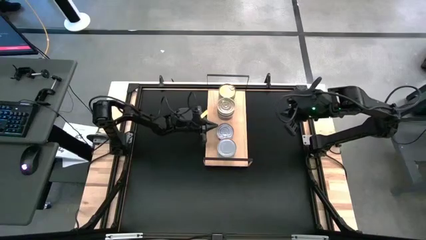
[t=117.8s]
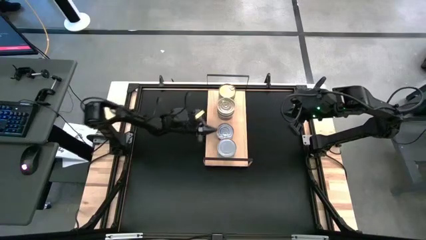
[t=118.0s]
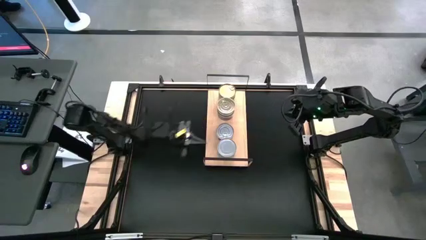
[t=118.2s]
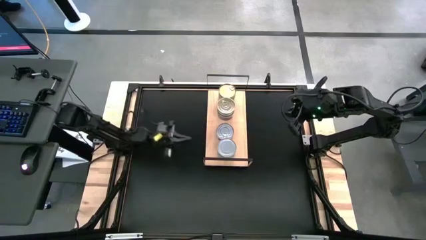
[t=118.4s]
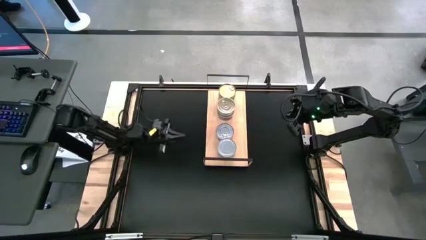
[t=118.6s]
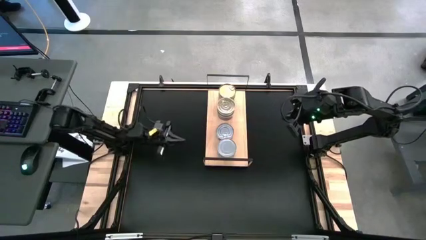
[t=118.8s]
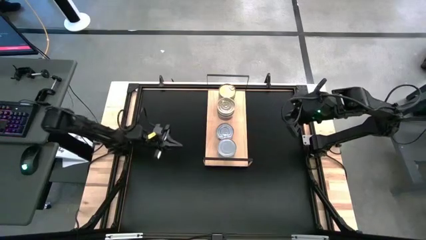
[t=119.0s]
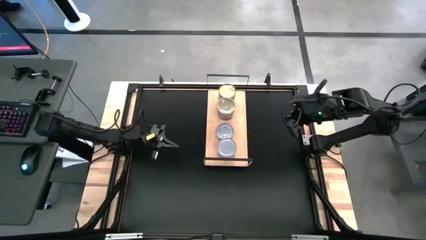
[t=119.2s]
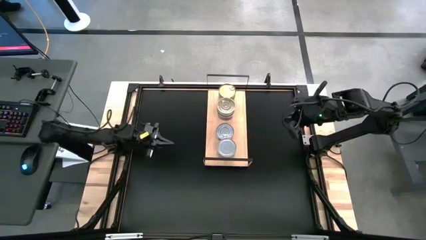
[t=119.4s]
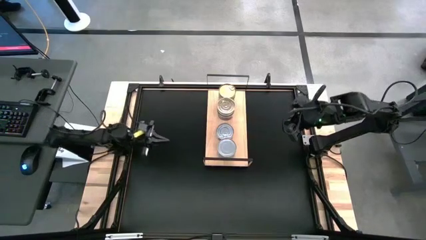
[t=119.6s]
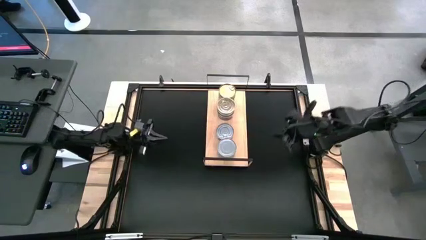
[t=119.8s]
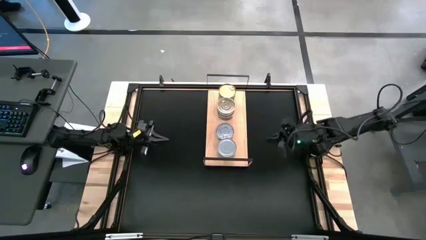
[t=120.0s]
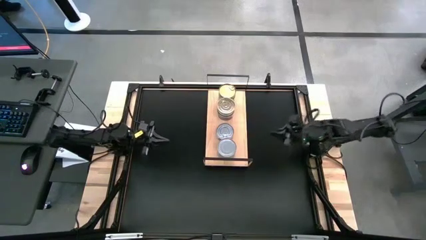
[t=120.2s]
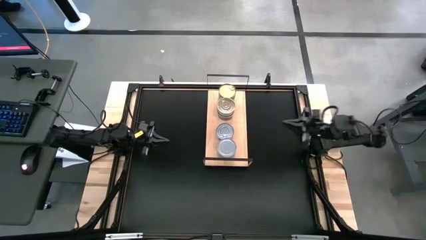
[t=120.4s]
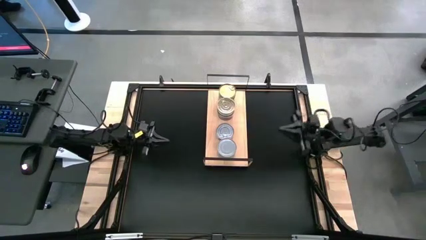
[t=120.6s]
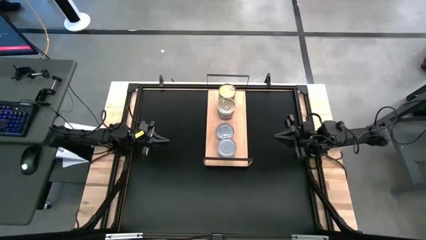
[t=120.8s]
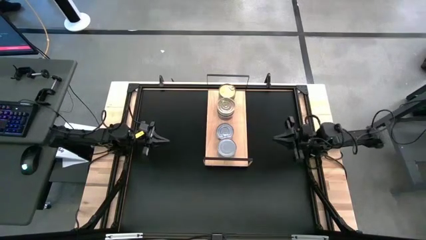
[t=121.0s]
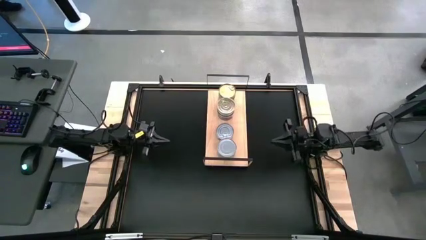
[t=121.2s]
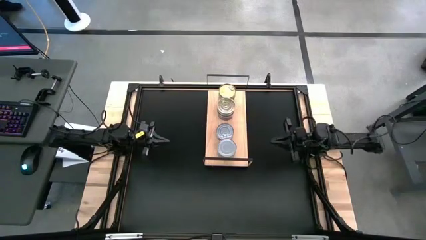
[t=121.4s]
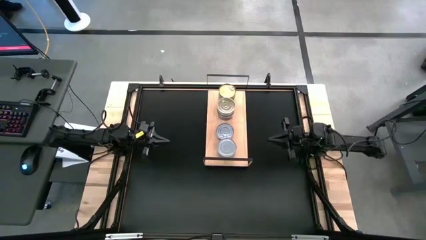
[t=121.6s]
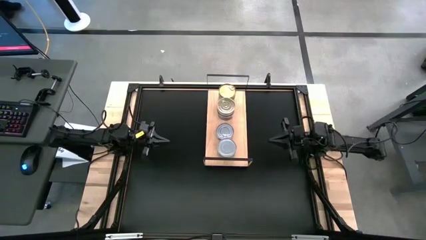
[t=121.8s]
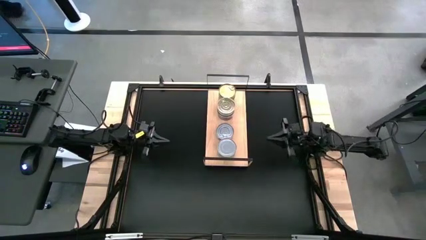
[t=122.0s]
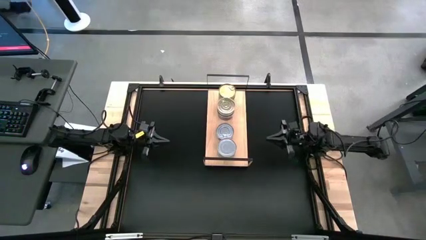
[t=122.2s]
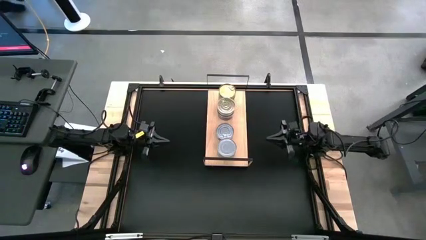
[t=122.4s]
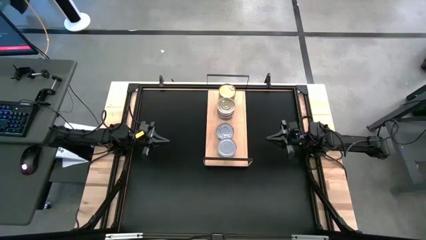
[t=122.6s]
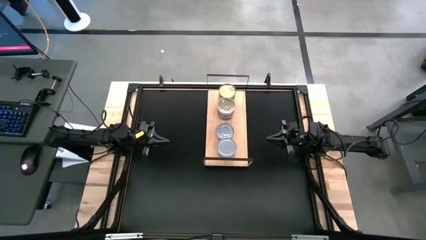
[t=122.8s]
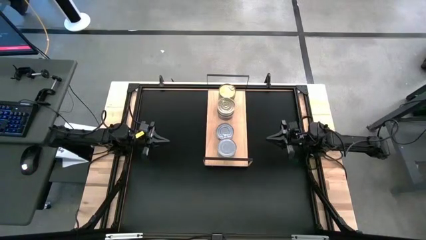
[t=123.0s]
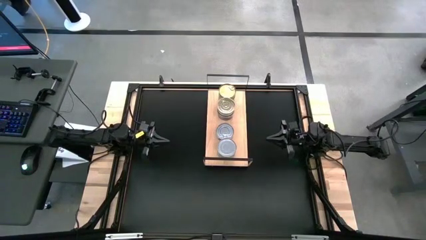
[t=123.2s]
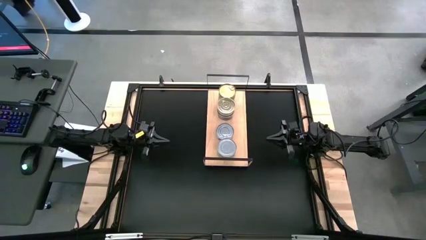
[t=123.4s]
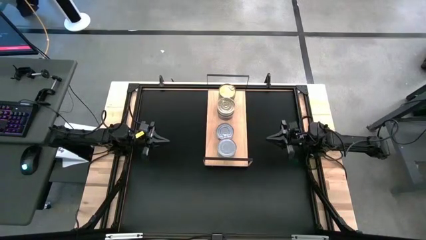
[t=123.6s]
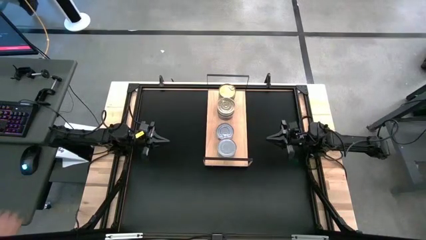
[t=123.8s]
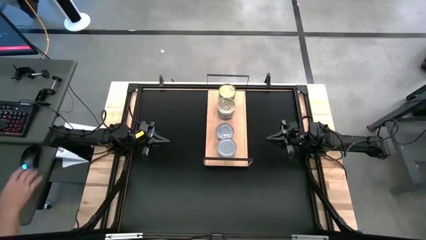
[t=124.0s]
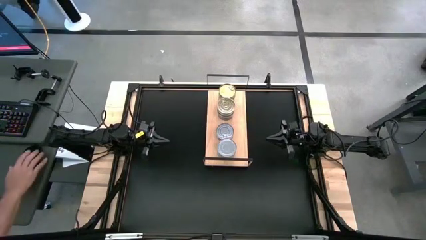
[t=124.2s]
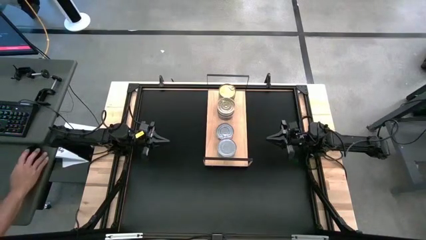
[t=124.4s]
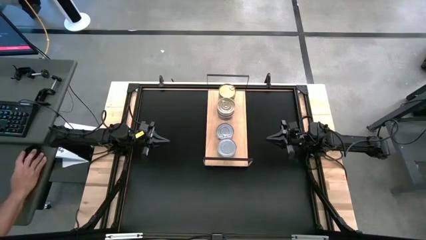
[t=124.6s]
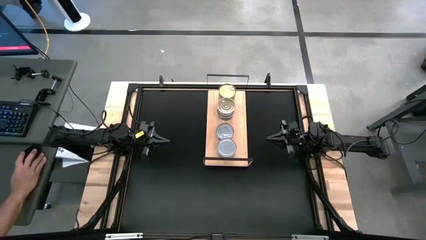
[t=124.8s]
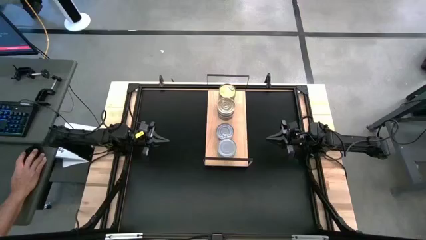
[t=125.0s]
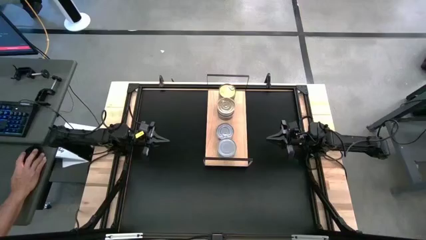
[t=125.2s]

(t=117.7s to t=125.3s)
Task: Stack canned seafood by type on shelf
Return to Home Position

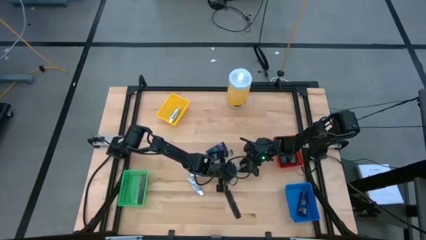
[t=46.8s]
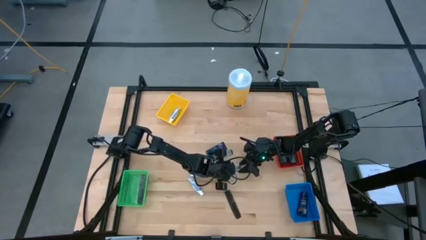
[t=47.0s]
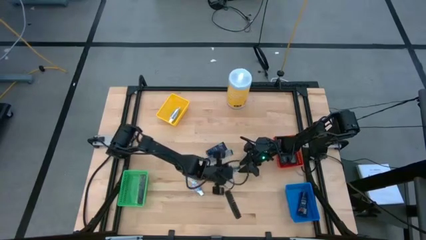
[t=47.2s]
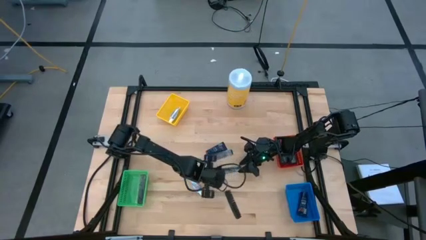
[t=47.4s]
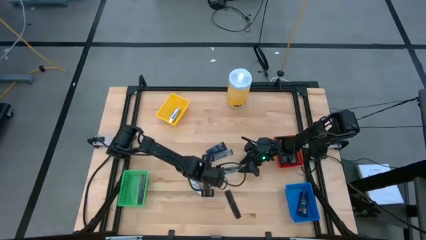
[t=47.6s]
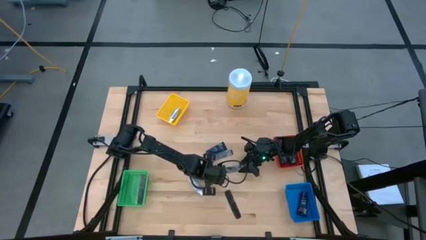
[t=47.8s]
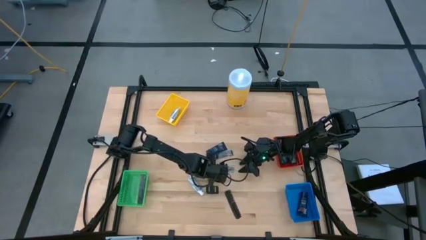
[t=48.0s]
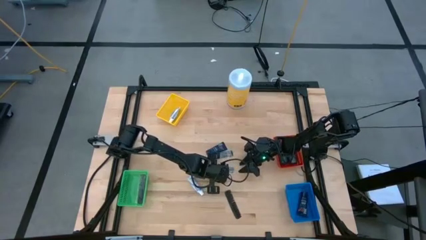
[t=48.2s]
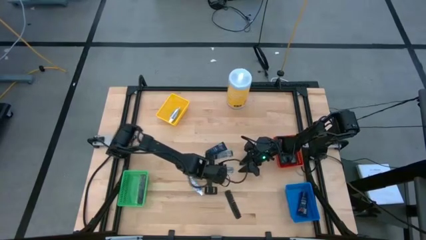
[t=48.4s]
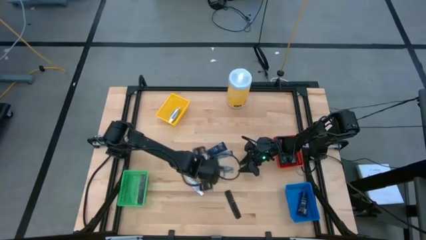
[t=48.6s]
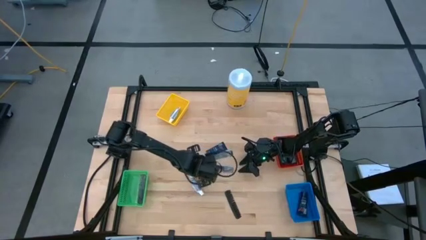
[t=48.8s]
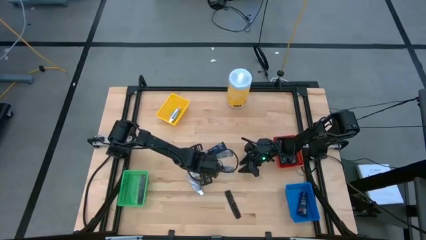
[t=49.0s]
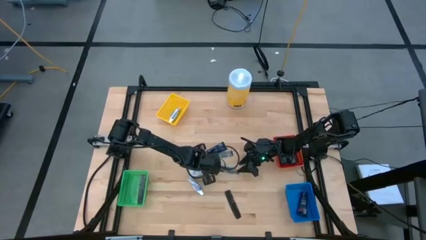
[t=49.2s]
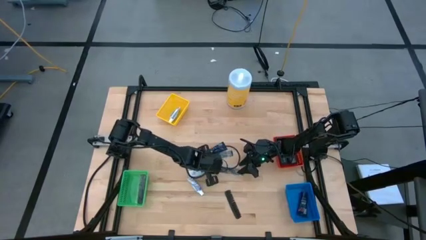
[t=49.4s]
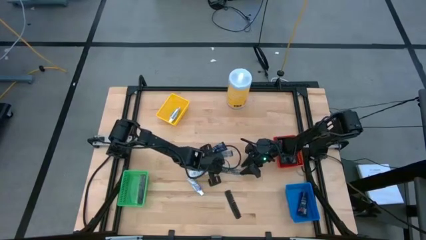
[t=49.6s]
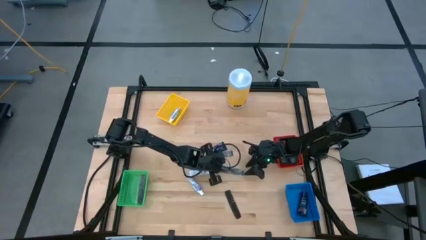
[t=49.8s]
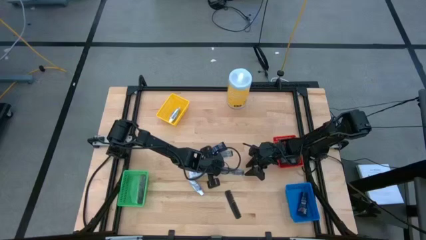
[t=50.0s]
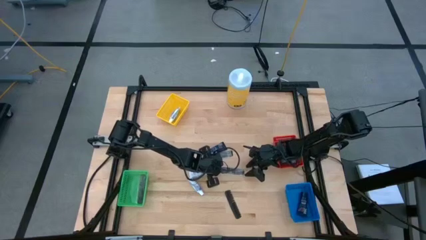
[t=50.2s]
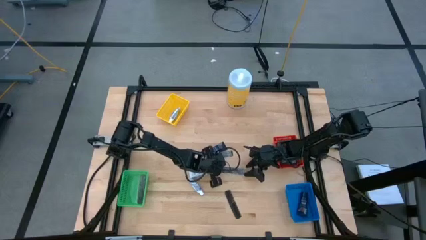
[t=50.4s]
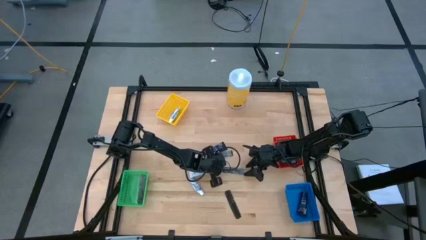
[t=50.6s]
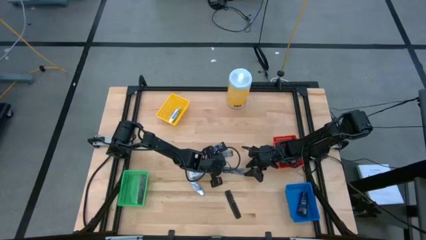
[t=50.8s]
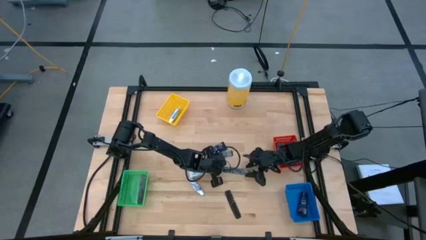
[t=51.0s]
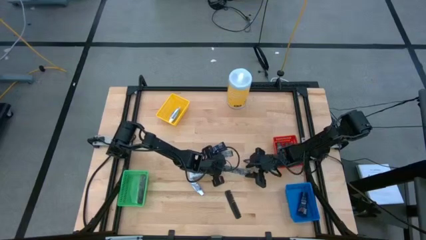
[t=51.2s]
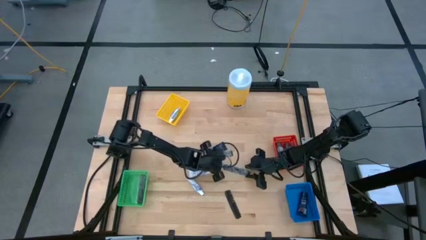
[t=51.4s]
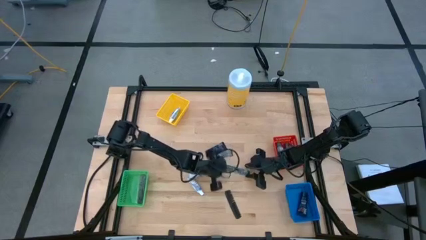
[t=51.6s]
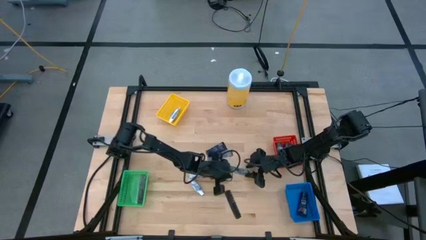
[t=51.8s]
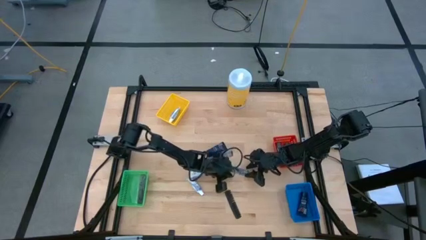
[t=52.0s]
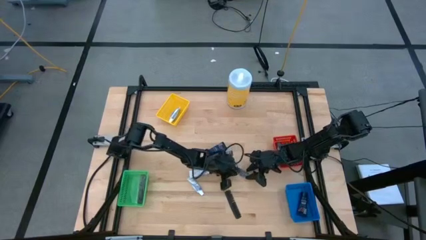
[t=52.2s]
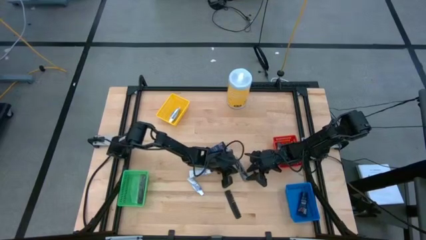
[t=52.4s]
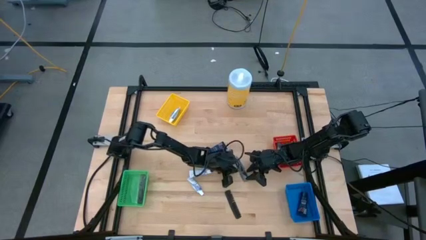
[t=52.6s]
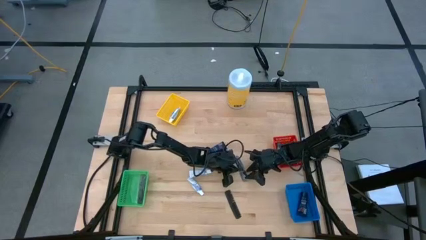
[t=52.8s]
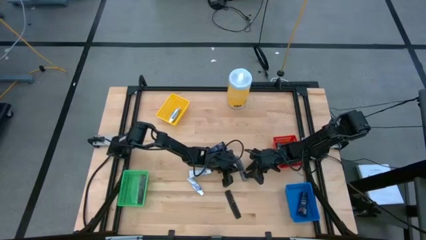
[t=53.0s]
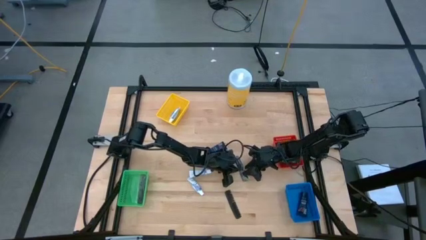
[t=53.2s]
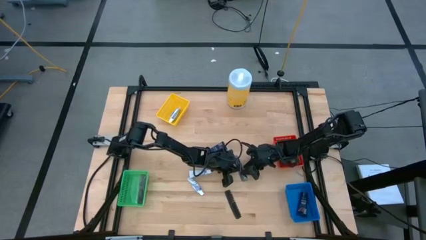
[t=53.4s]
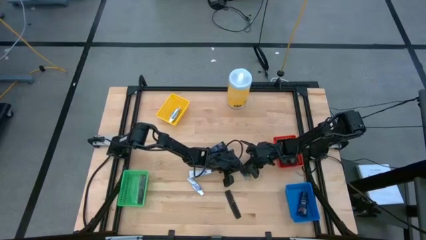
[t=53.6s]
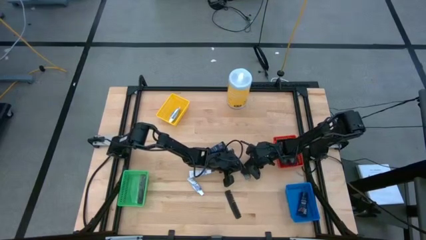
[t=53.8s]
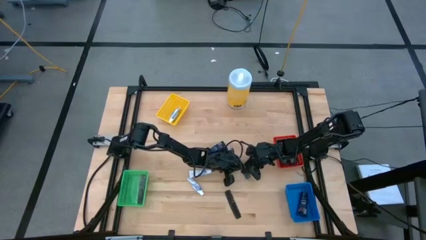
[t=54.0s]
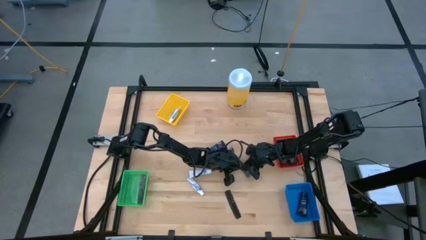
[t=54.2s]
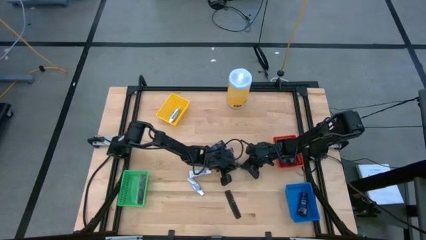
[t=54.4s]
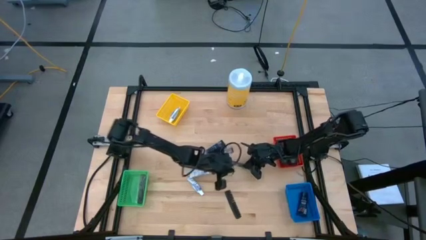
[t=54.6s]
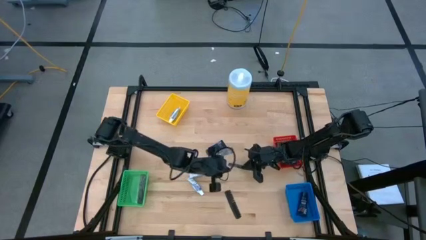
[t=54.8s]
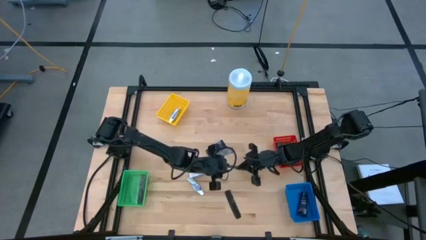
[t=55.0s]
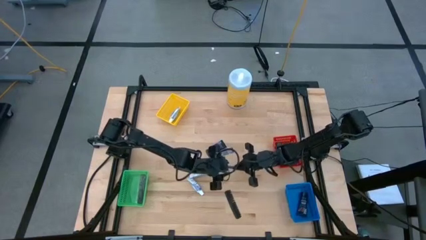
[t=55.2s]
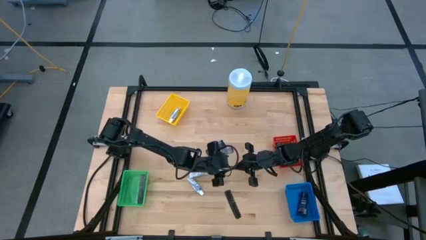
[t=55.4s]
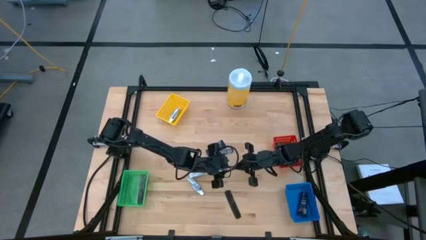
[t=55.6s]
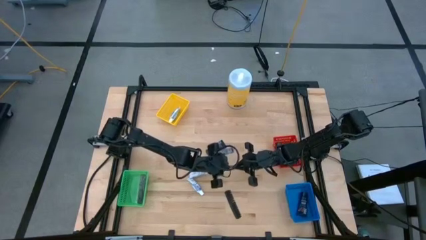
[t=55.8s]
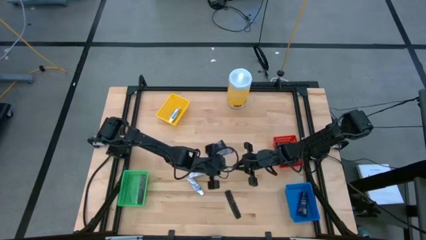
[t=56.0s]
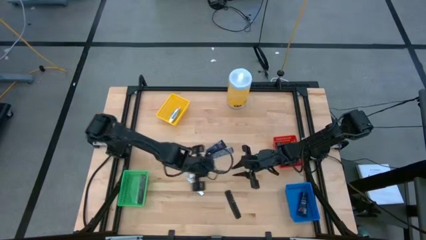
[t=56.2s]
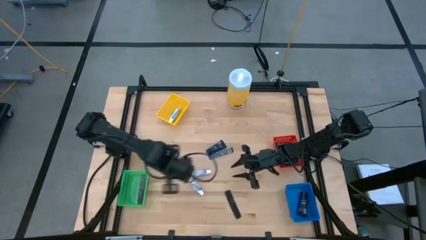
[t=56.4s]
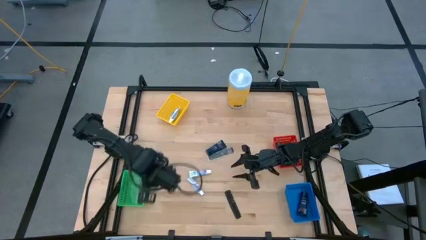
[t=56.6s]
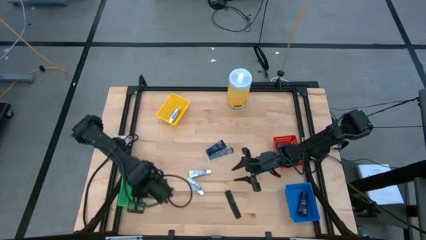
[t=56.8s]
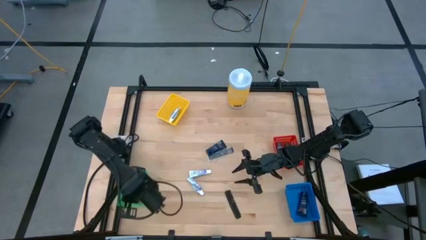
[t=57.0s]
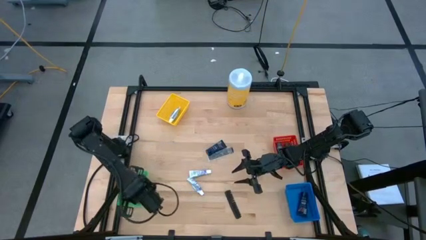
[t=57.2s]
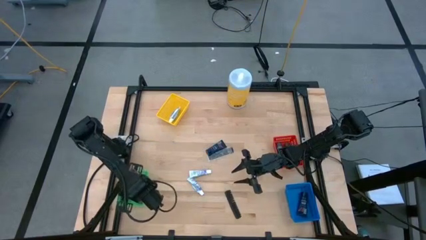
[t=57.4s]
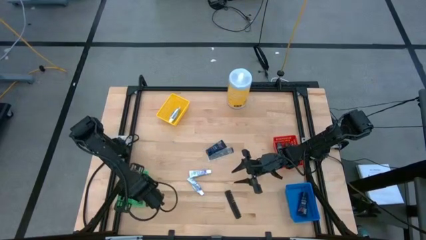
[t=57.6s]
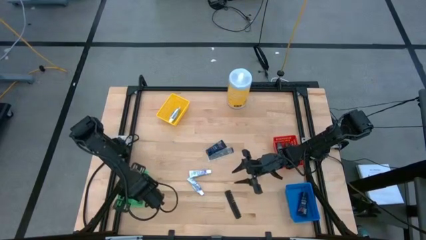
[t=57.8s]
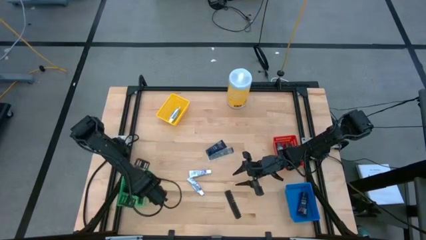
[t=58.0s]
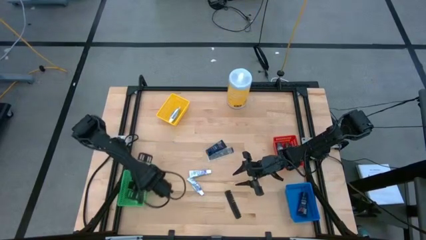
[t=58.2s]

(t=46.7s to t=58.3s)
Task: Pick & Place Travel size toiletries
Put the black comb into the green bin
